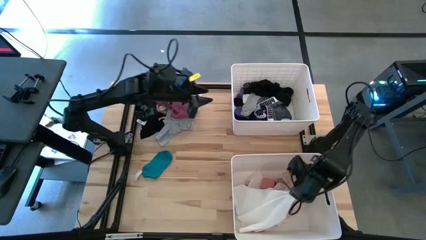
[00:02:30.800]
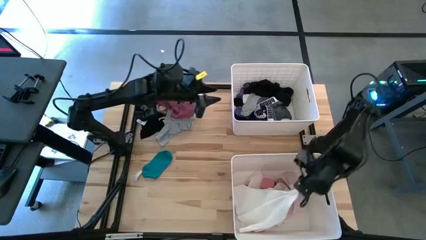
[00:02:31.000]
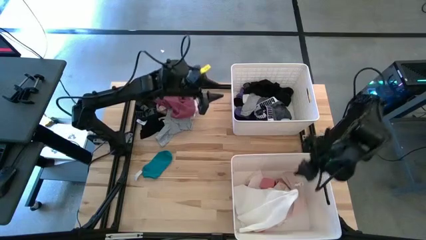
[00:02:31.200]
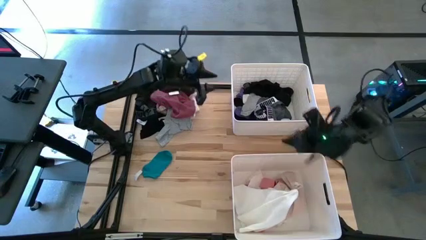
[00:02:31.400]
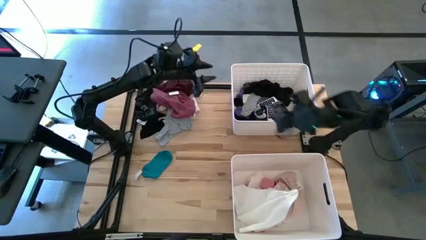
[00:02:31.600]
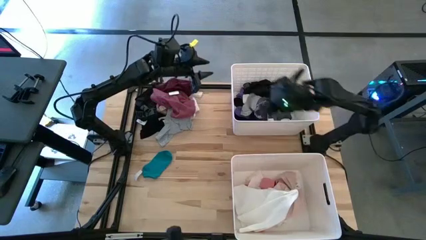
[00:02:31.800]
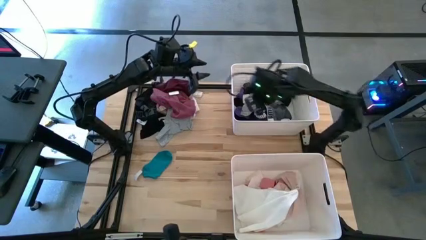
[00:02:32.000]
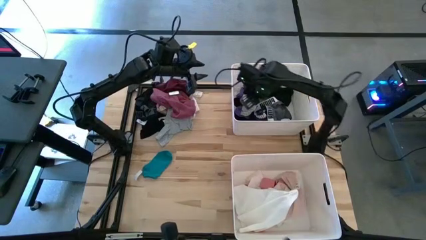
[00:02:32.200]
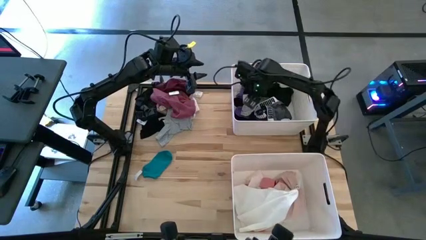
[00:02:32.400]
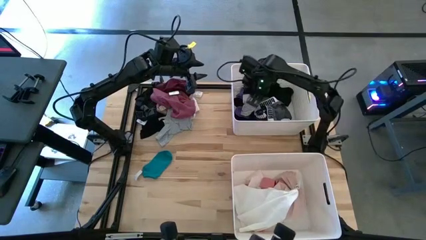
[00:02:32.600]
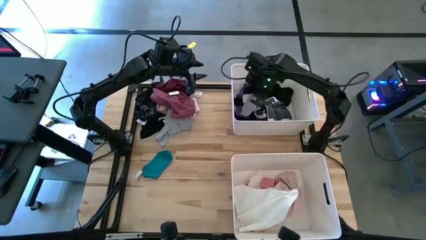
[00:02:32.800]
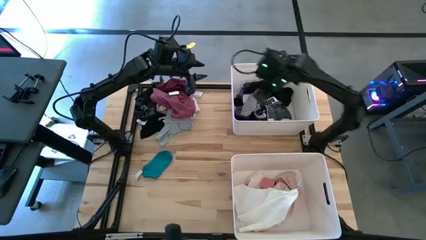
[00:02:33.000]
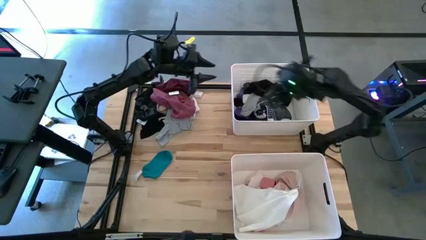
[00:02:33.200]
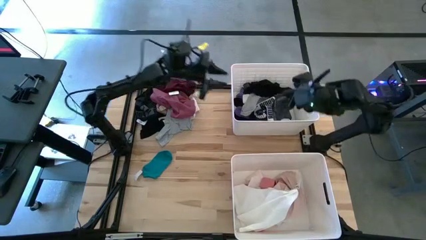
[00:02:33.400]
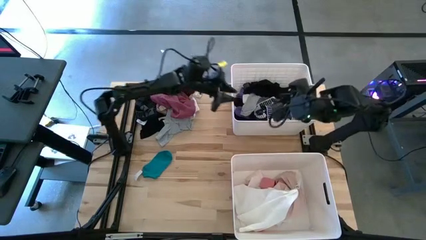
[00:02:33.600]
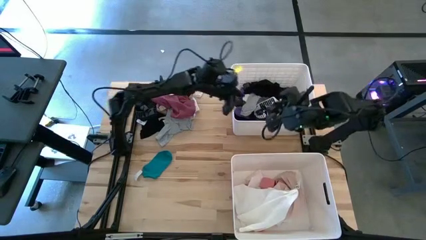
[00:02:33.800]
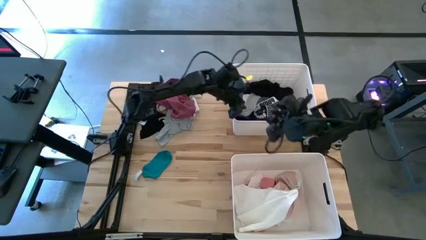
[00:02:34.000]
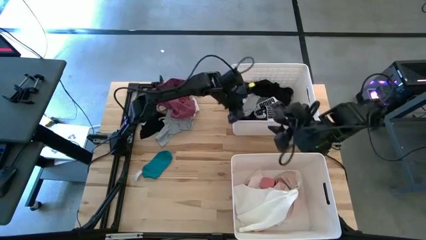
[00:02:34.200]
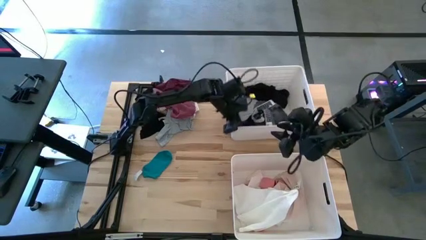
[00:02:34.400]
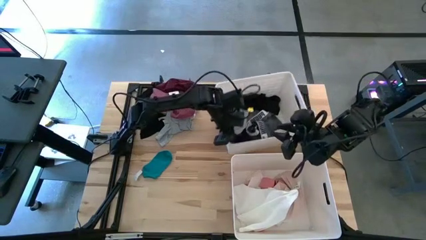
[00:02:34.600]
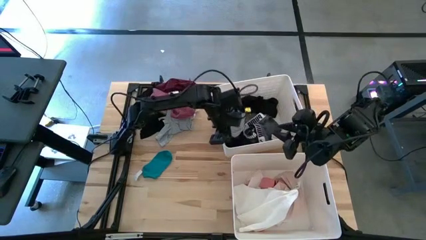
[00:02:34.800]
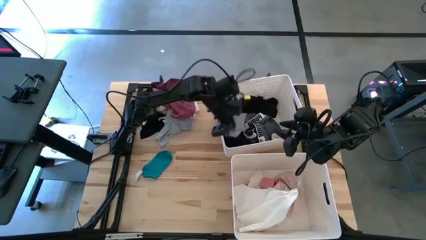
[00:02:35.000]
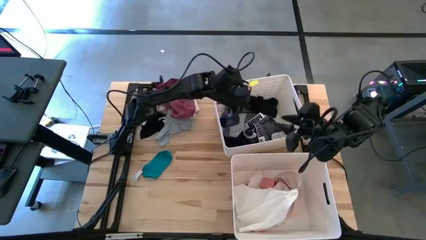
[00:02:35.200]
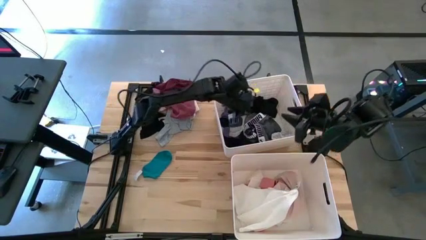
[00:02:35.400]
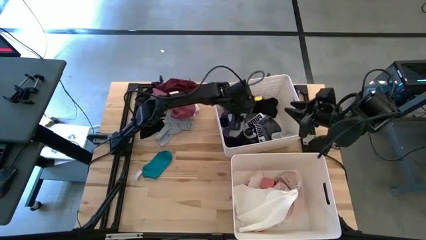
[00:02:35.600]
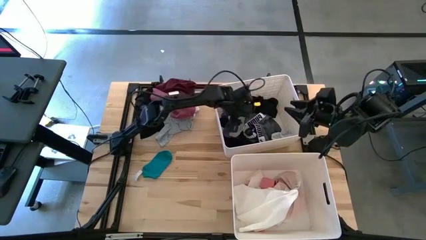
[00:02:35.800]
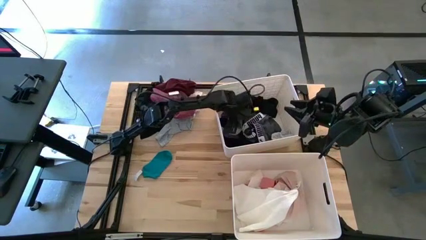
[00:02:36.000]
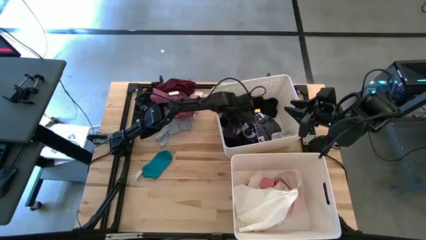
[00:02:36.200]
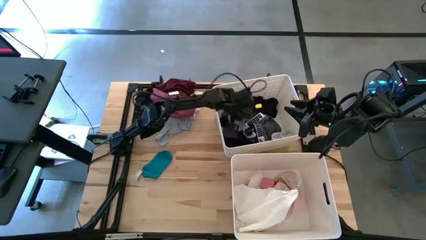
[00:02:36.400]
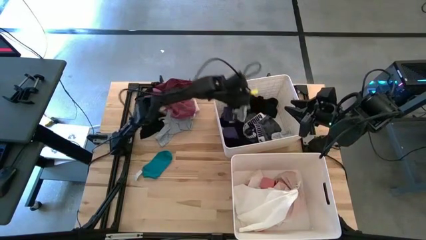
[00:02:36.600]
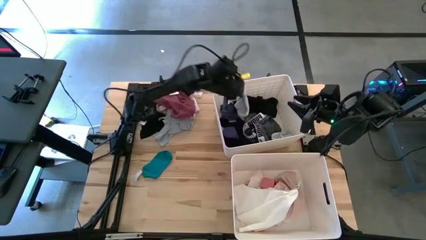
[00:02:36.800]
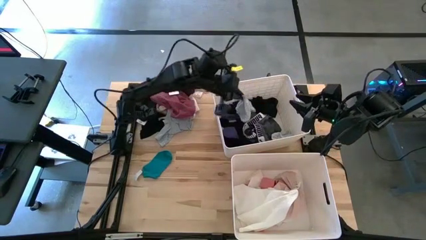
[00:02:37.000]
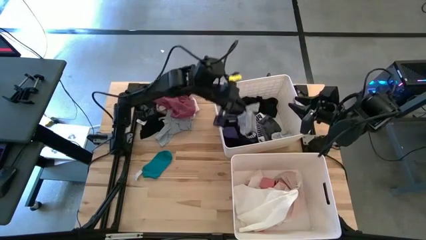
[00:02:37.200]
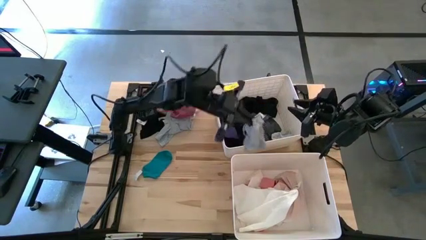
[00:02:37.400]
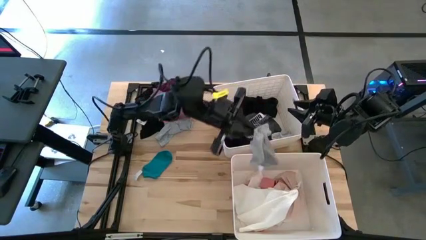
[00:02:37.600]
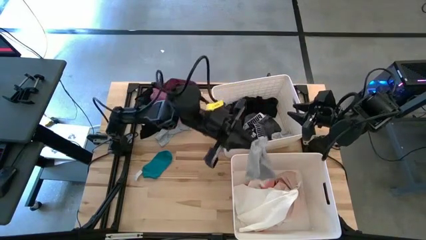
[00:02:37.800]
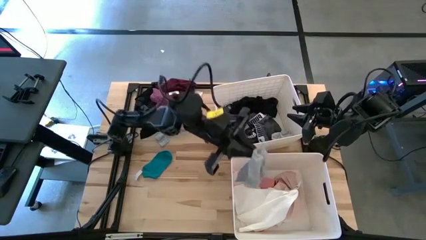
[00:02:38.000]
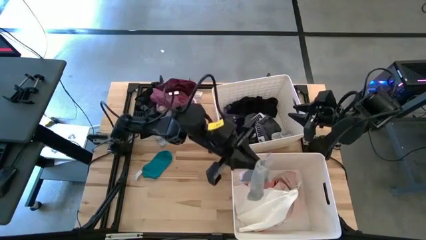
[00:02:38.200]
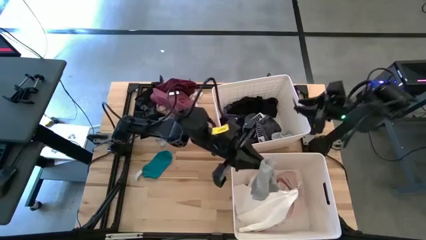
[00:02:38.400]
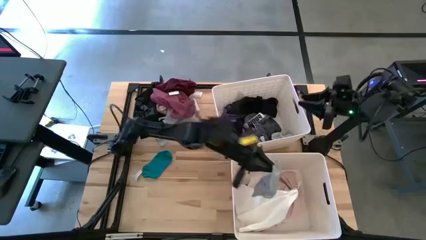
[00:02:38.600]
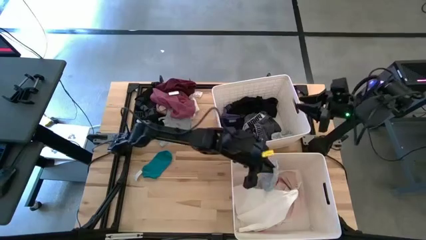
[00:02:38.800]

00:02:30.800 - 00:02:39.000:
Task: Sort clothes
Move the grey sock from the top bin to the bottom bin

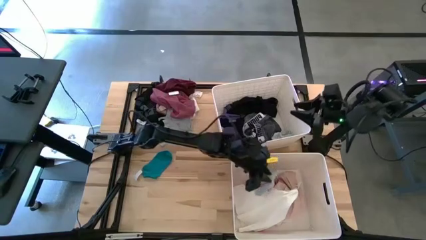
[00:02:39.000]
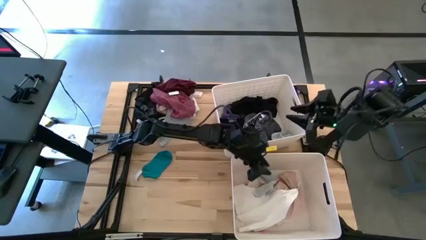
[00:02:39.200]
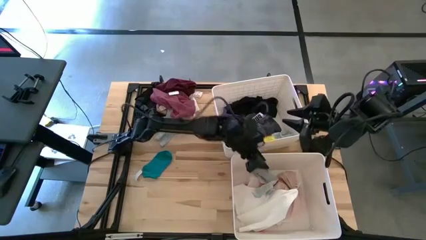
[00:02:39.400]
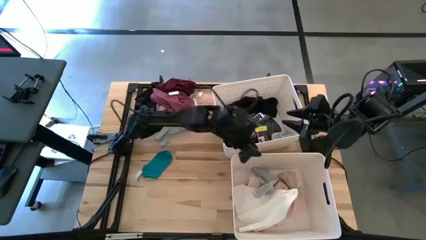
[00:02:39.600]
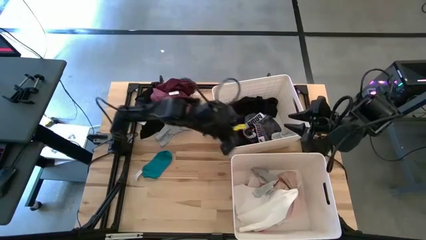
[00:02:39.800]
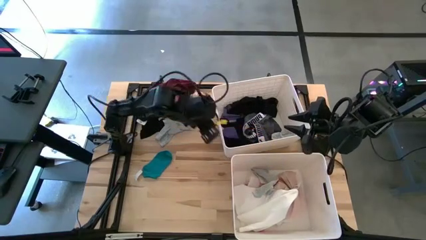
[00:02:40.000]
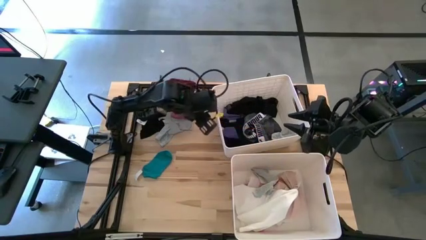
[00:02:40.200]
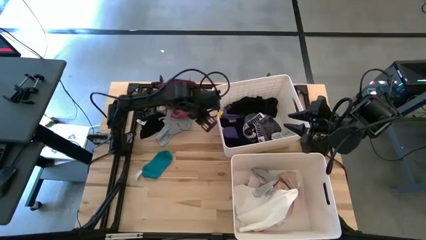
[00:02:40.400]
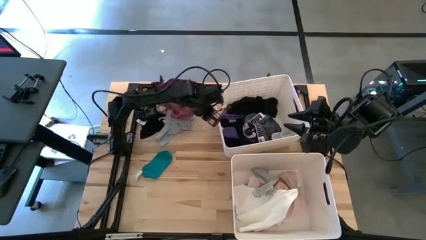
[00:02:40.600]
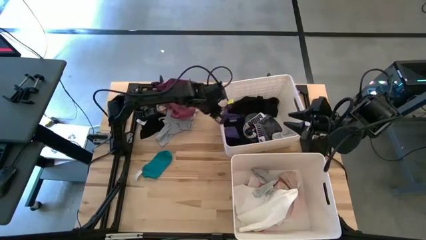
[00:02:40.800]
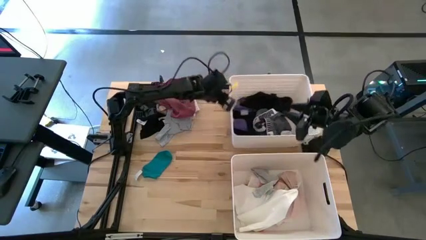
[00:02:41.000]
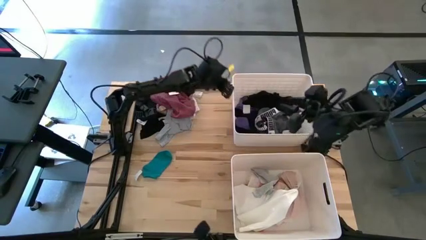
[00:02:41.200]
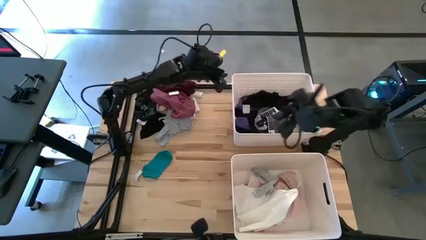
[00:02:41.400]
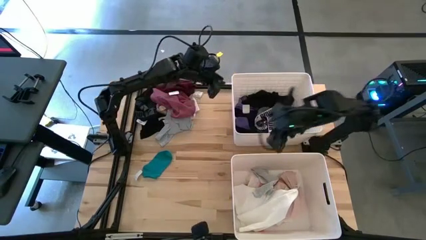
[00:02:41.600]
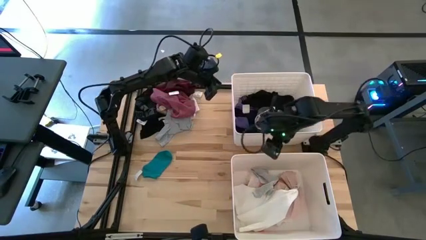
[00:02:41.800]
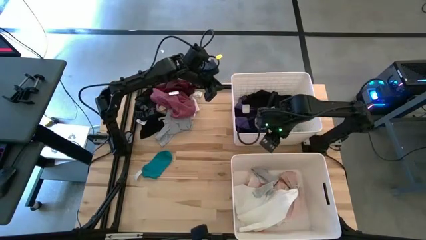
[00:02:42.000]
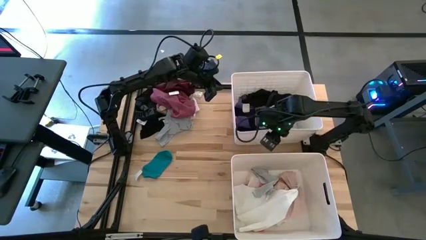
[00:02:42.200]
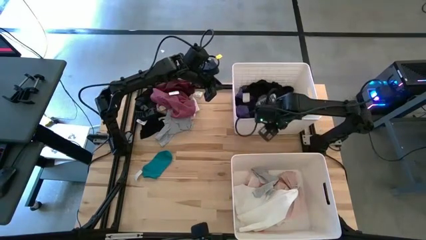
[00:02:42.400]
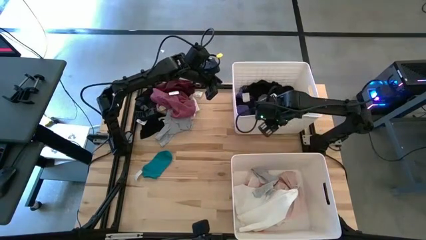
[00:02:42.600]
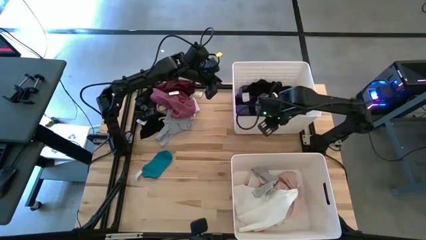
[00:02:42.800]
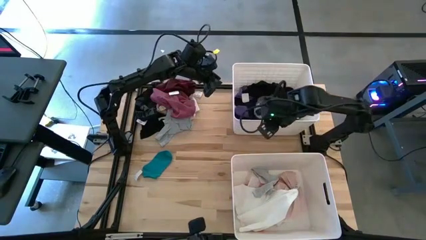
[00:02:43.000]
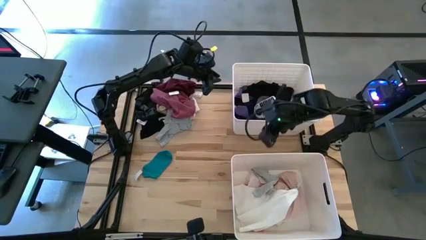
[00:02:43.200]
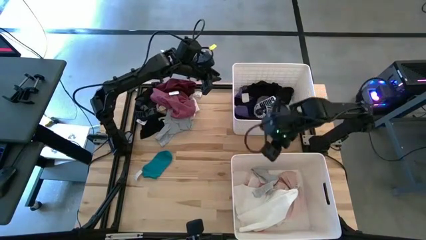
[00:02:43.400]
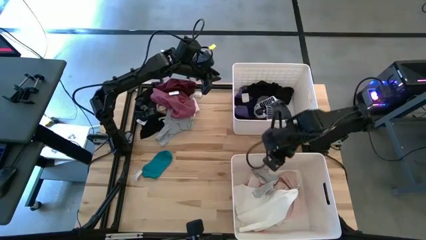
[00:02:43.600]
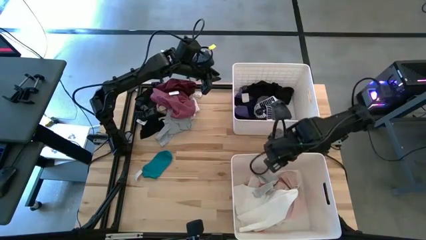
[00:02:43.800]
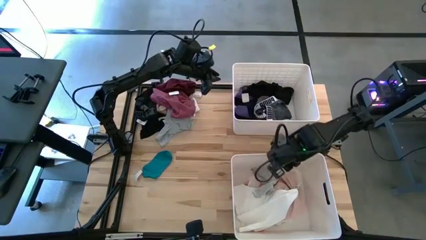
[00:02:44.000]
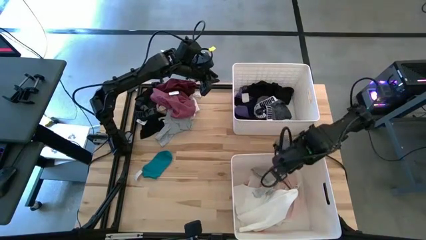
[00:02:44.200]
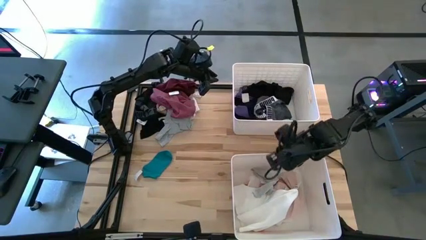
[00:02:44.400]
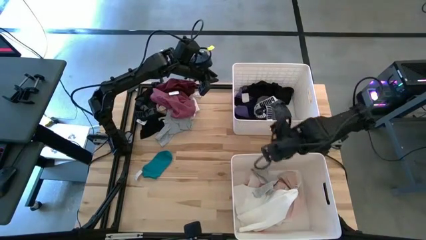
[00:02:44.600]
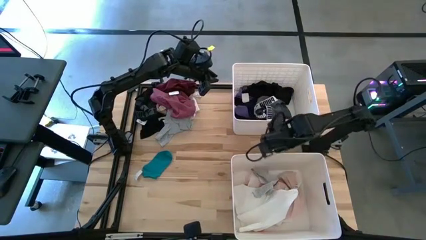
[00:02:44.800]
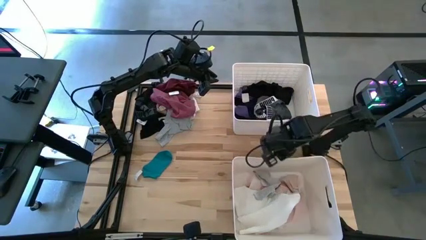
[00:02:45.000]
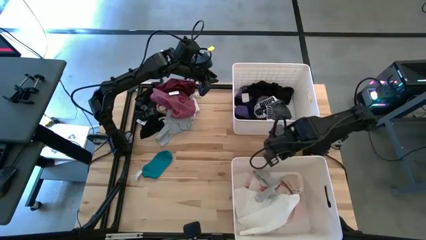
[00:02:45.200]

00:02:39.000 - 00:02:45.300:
Adjust the bins
